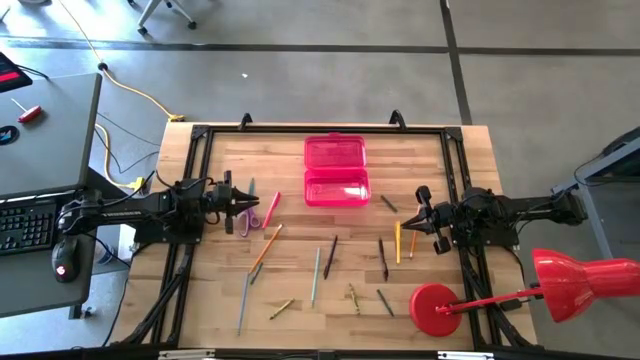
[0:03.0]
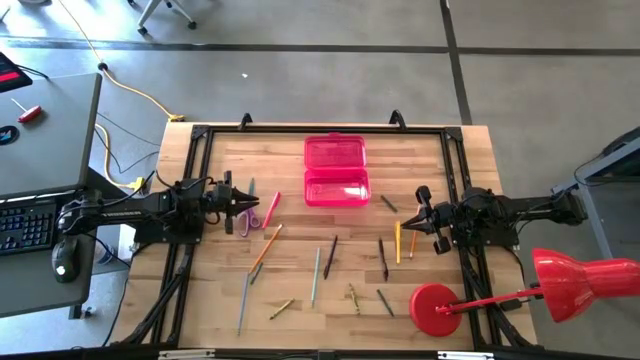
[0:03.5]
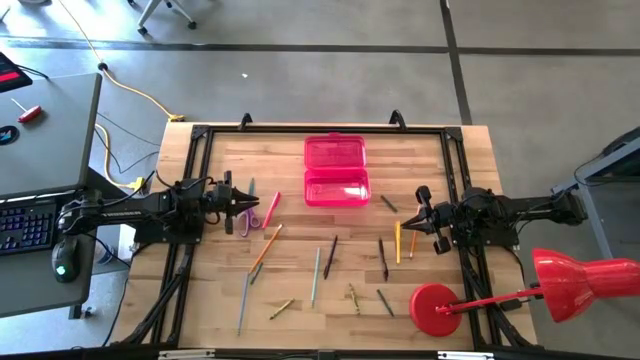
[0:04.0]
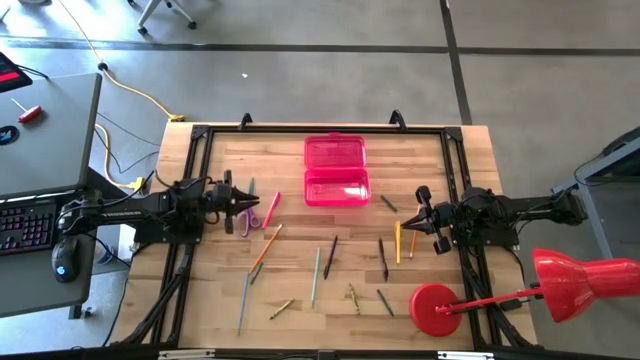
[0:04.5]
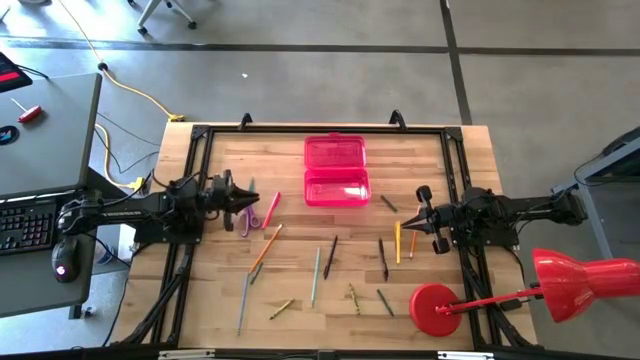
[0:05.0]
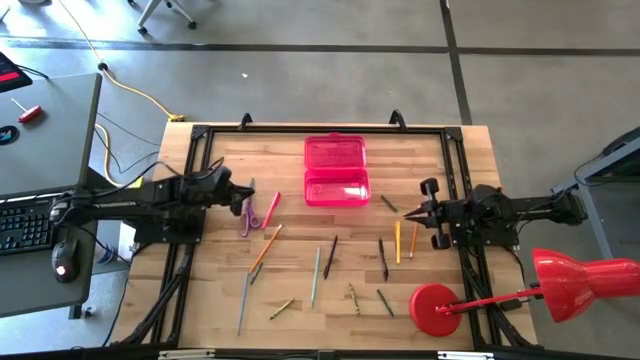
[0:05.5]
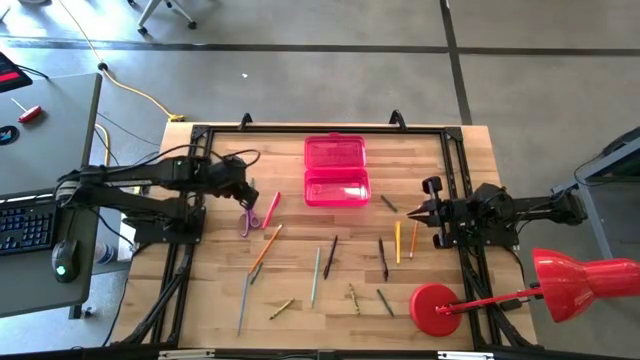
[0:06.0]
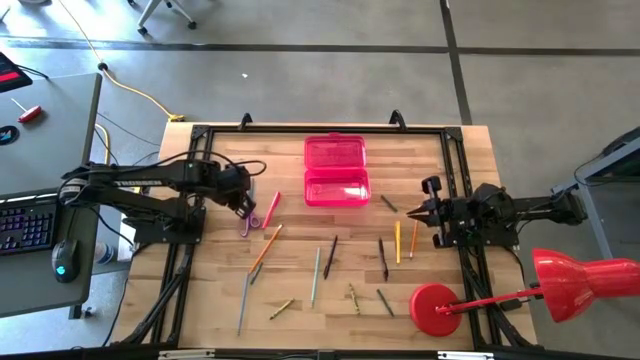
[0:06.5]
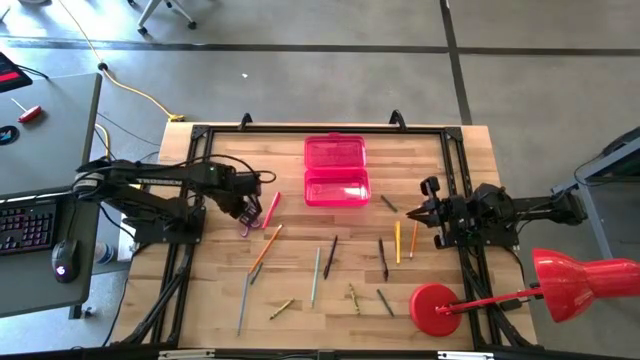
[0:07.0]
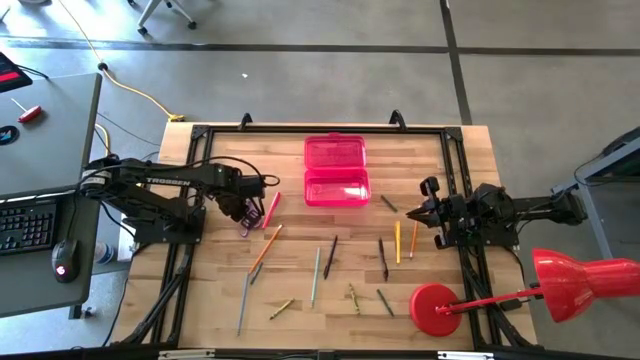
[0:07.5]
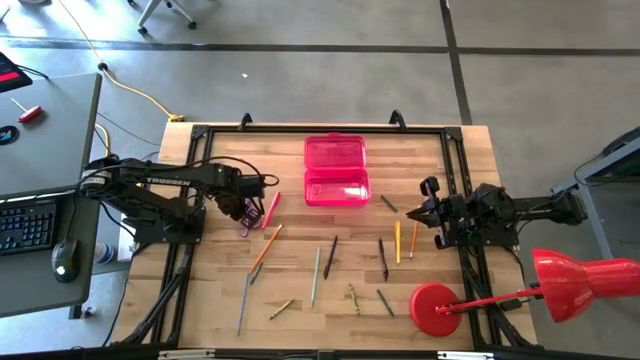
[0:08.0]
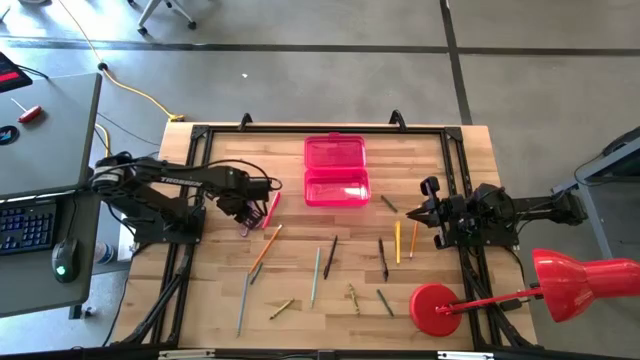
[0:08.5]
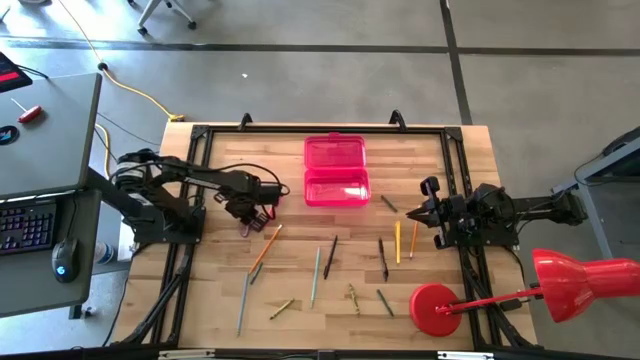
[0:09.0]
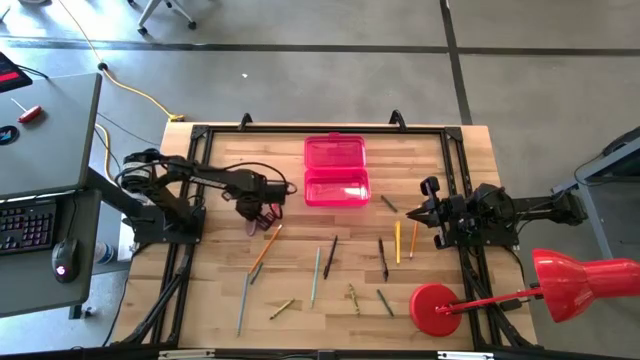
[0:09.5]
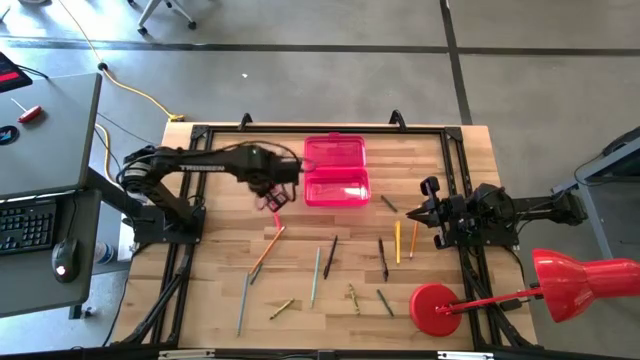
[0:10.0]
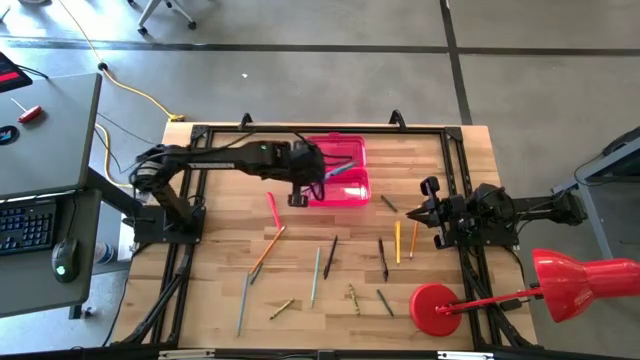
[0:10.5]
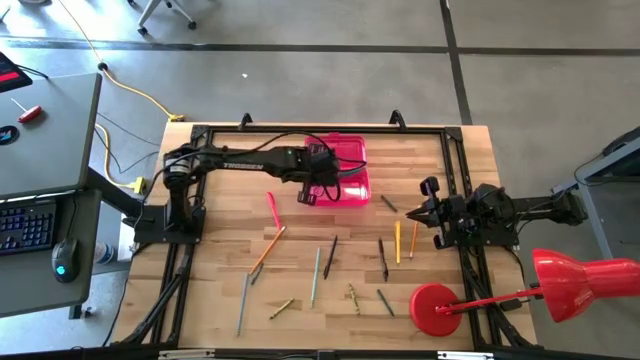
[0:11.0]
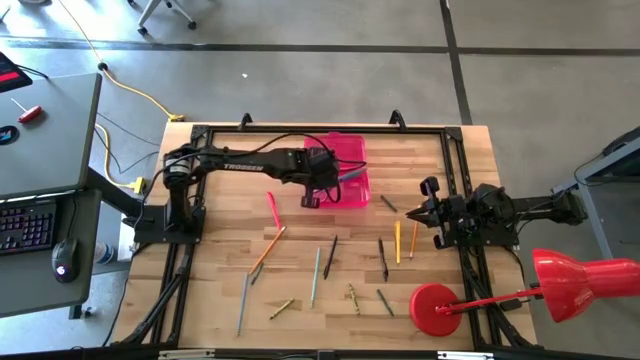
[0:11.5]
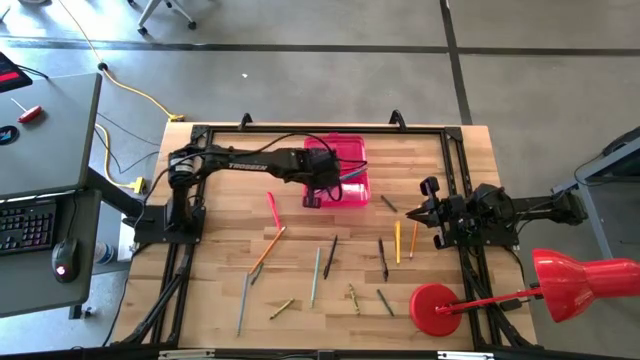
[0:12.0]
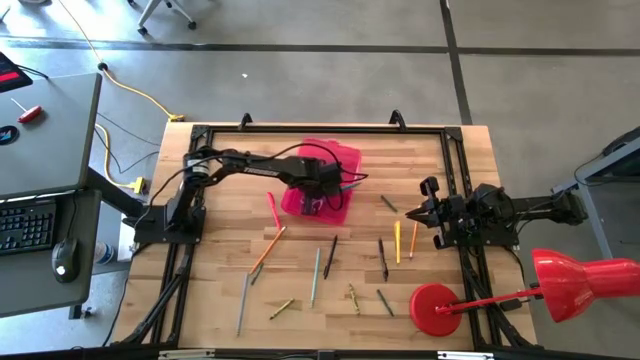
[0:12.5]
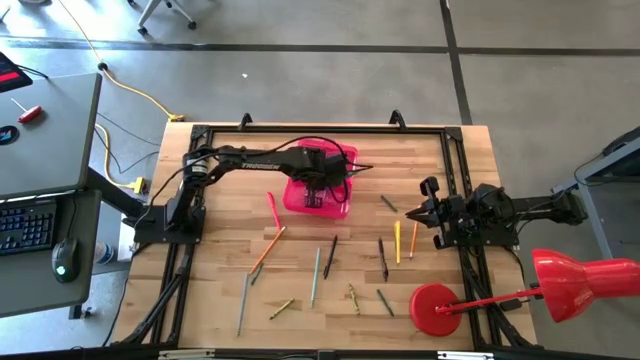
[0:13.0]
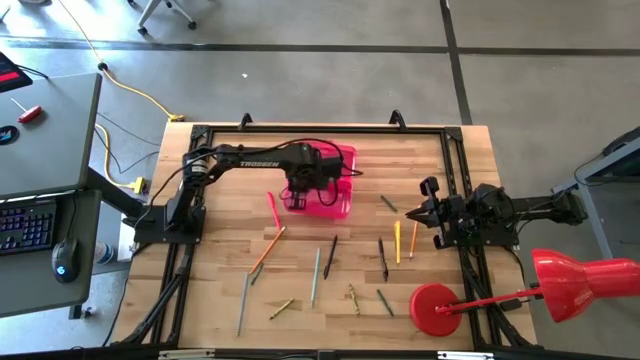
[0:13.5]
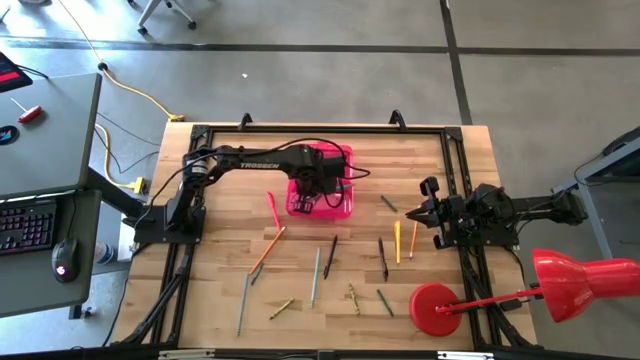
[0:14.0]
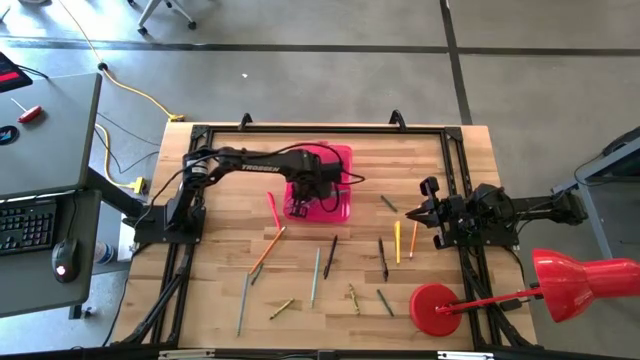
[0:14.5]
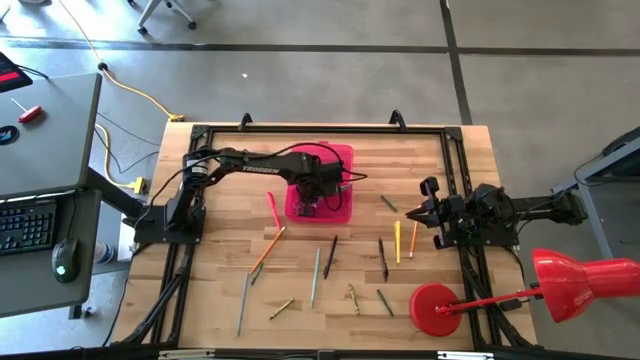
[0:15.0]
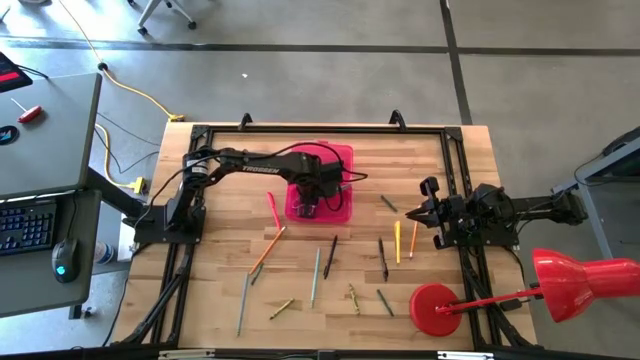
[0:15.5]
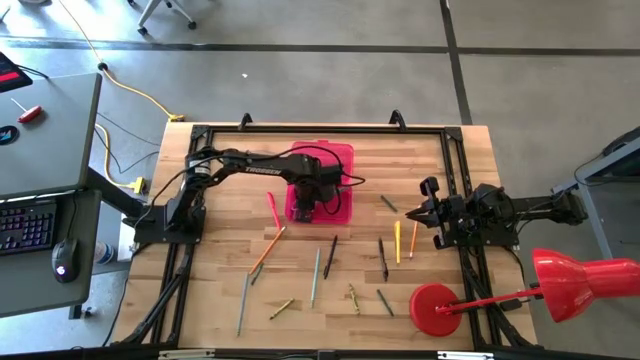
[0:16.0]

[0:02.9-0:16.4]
Task: Pick & place school supplies into a supply box
Put the purple scissors into the pink supply box

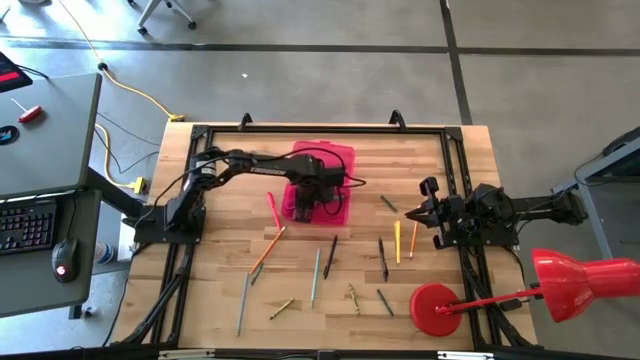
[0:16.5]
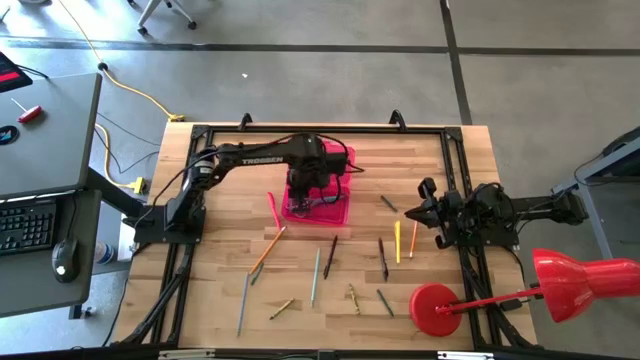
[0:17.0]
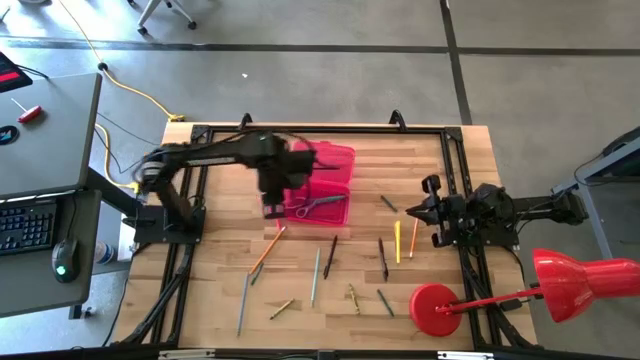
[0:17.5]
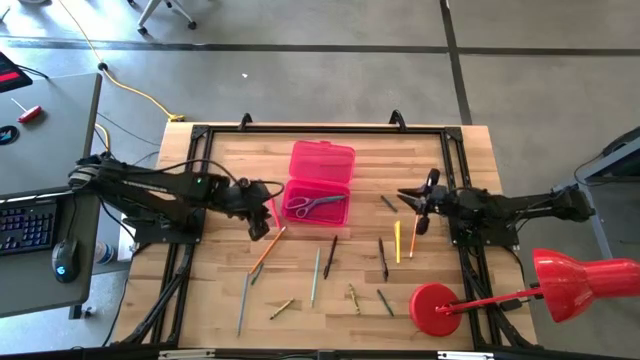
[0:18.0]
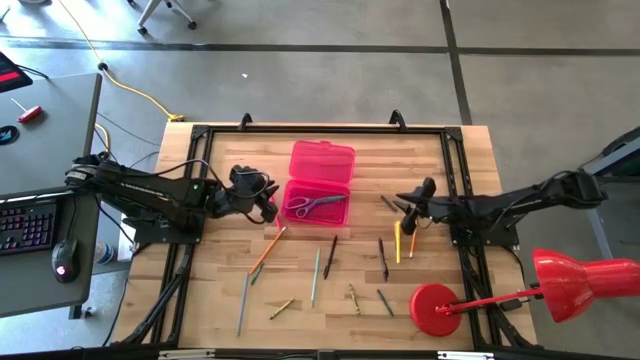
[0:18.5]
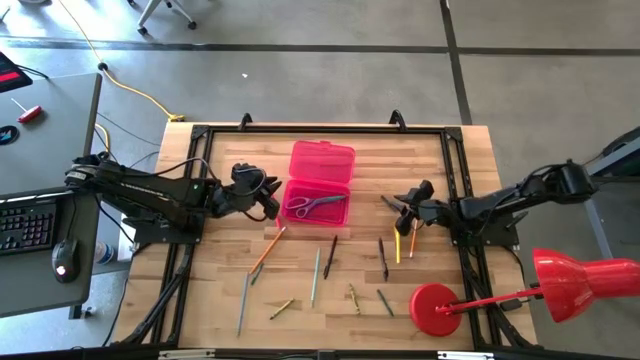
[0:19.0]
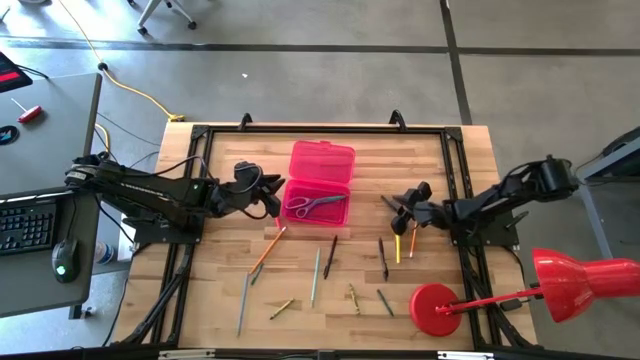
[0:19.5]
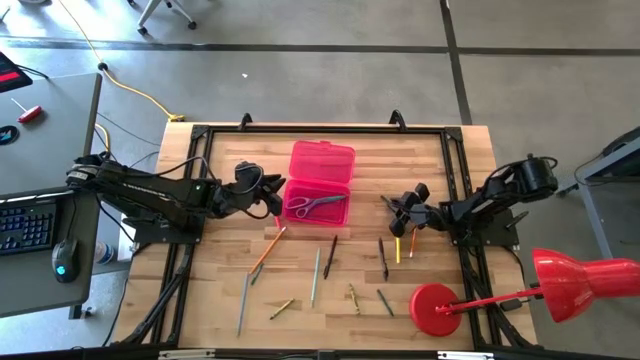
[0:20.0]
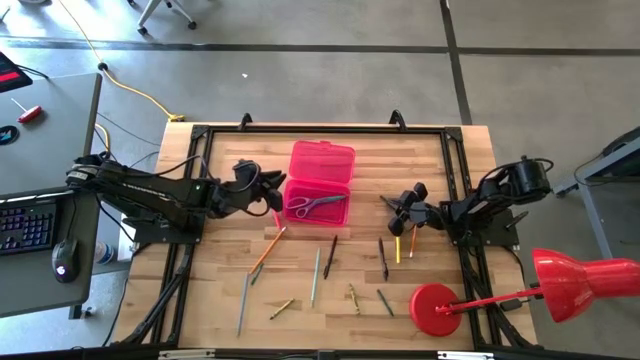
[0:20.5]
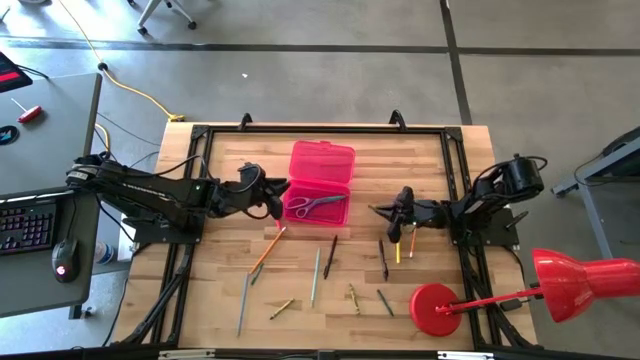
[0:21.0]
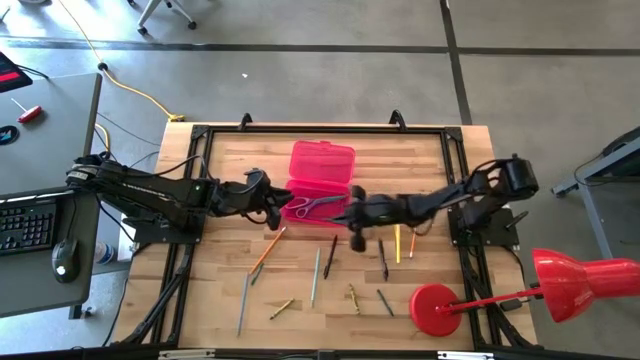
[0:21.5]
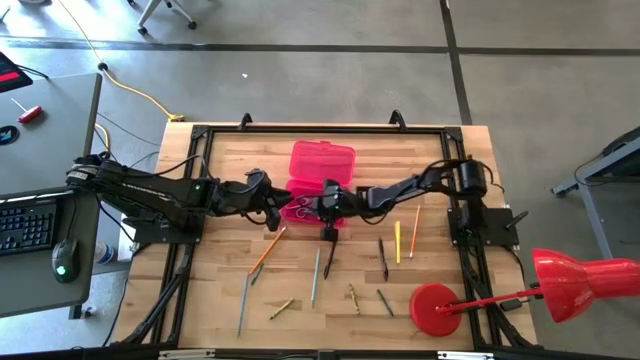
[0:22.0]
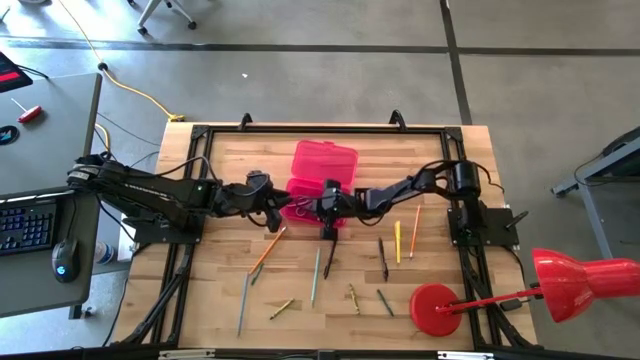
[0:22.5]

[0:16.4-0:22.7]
Put the top right dark green crayon into the pink supply box

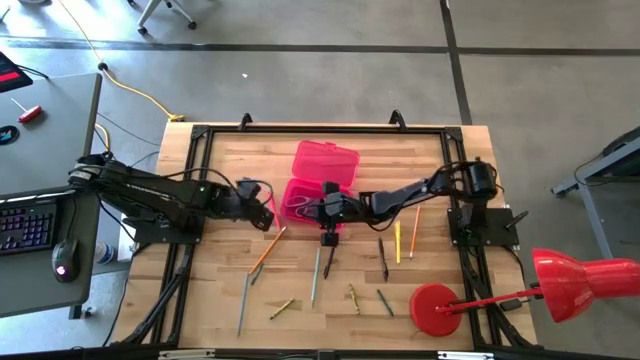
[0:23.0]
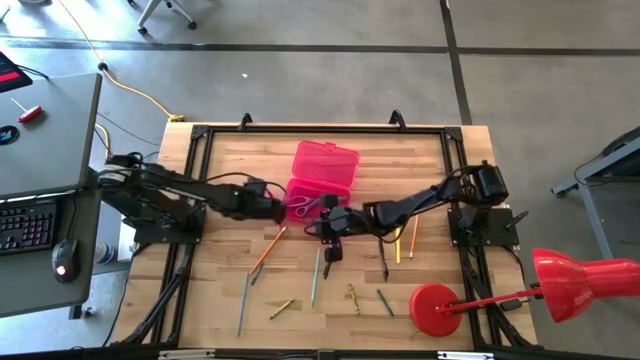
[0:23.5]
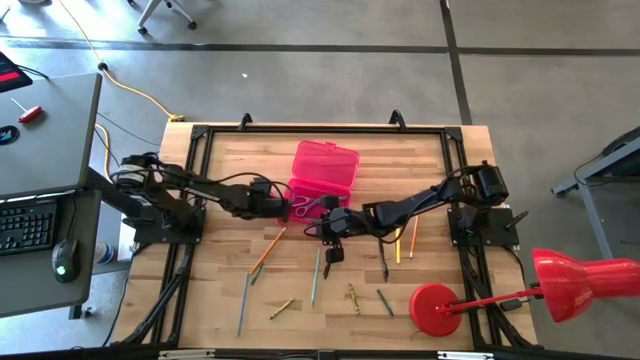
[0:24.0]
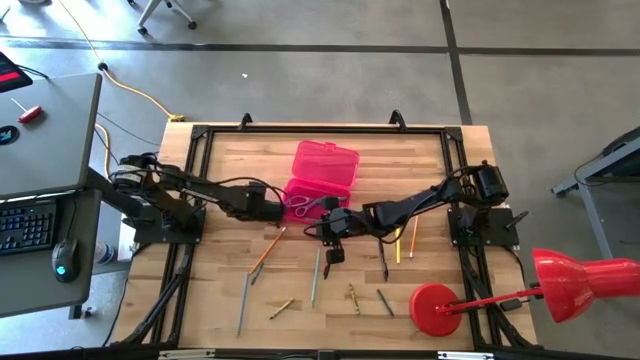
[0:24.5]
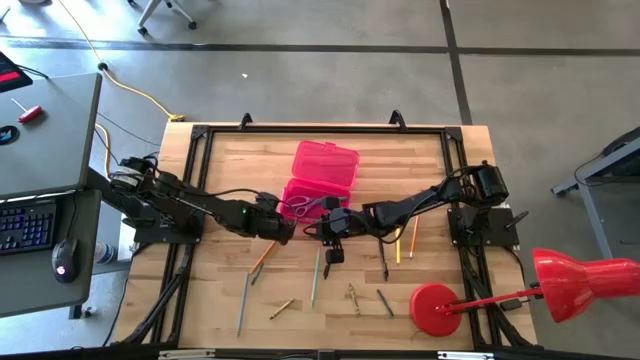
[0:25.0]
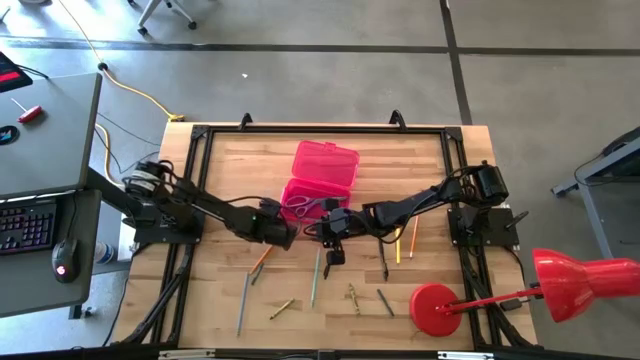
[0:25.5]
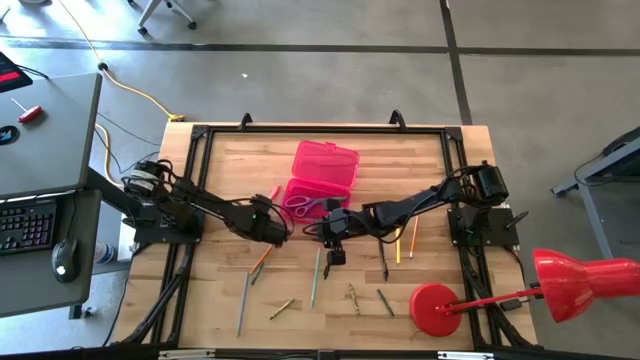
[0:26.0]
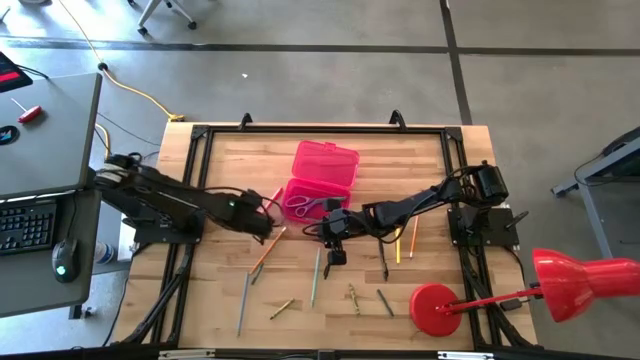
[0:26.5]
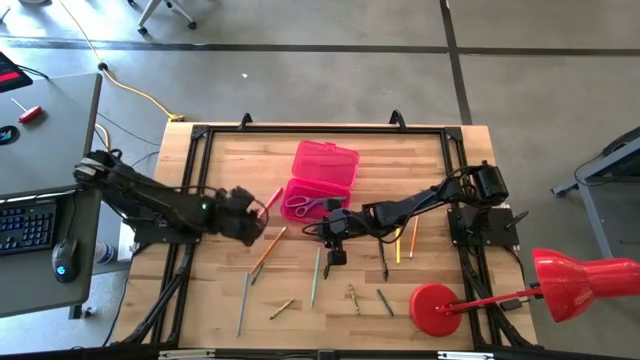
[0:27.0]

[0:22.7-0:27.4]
Put the pink pen into the pink supply box
